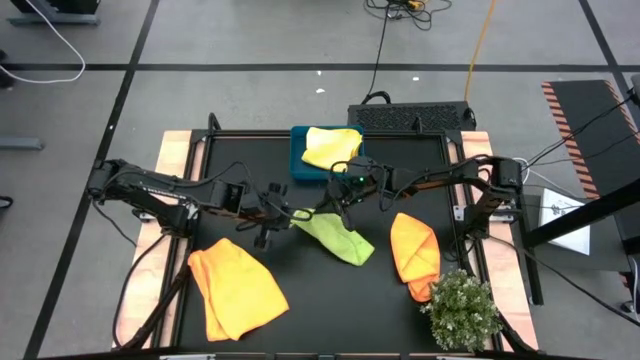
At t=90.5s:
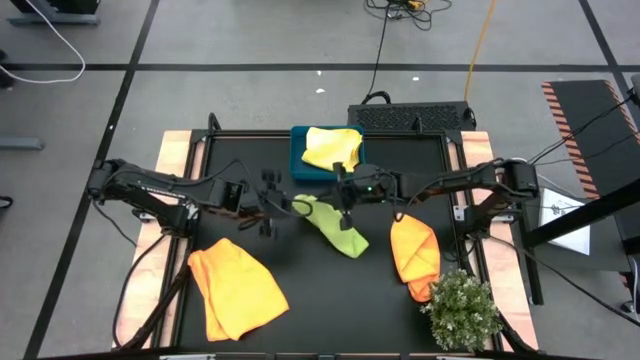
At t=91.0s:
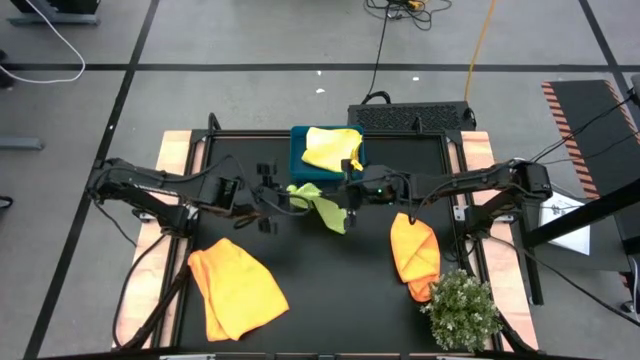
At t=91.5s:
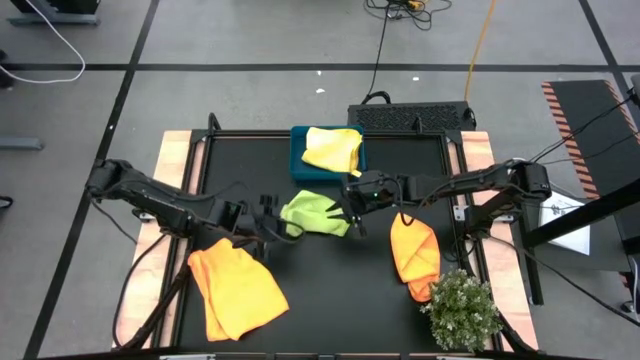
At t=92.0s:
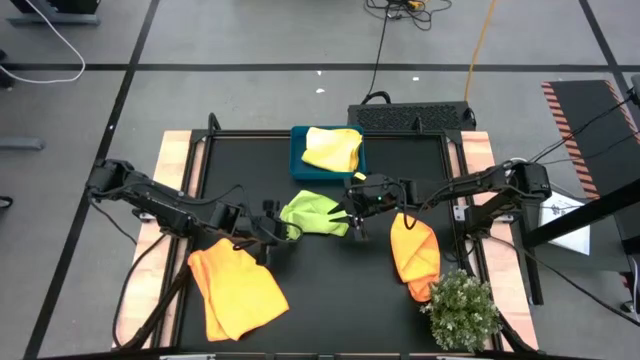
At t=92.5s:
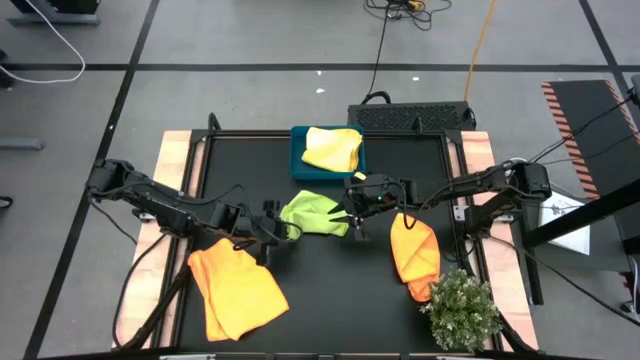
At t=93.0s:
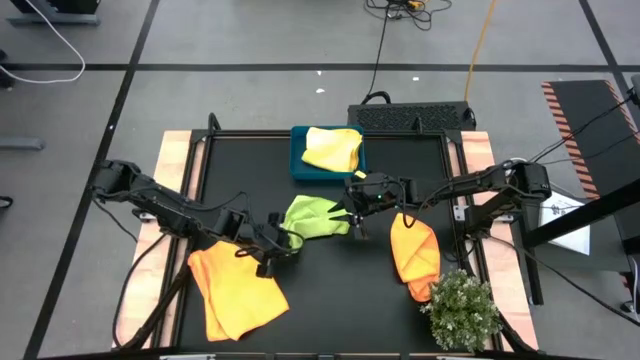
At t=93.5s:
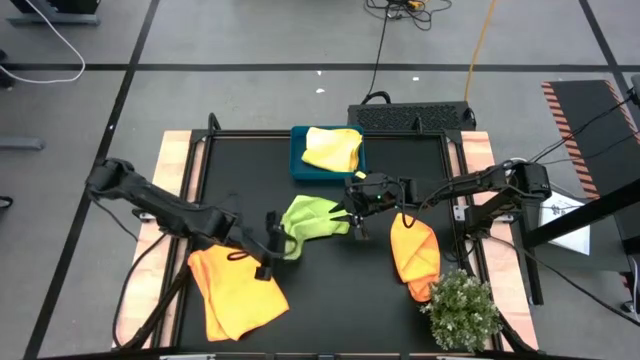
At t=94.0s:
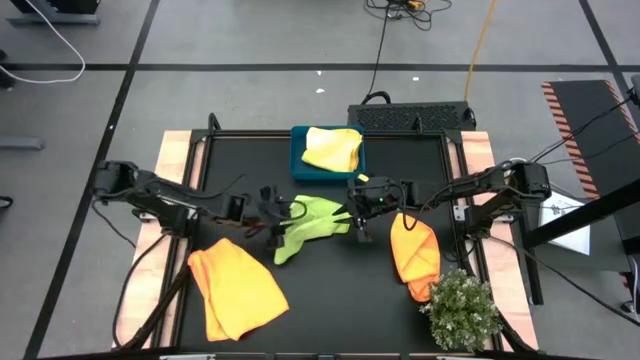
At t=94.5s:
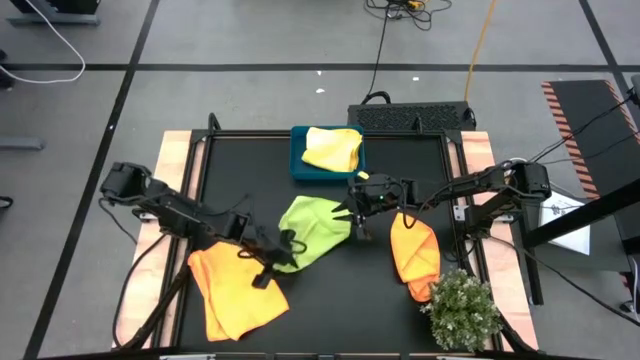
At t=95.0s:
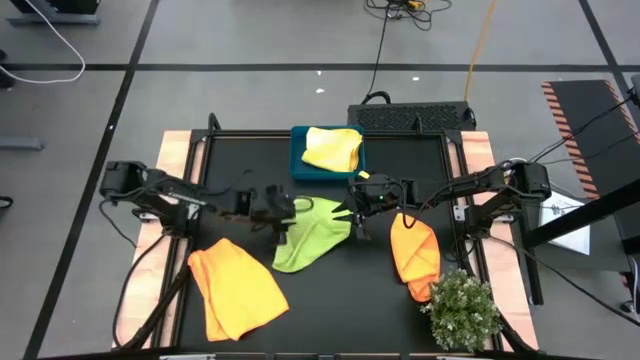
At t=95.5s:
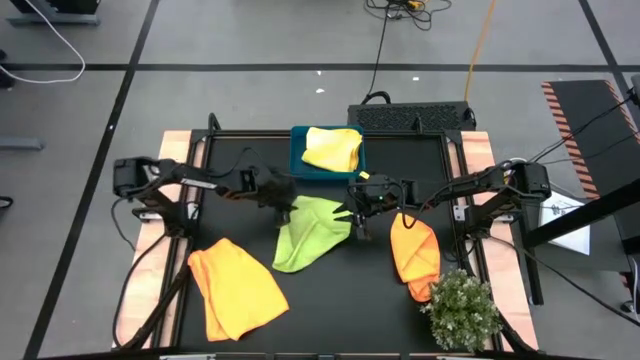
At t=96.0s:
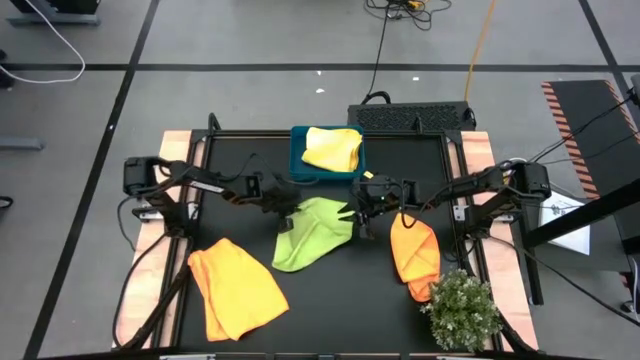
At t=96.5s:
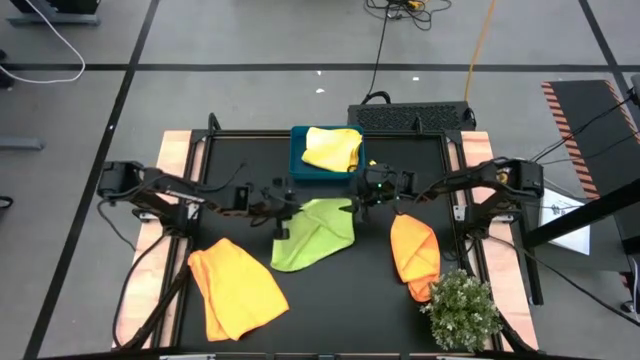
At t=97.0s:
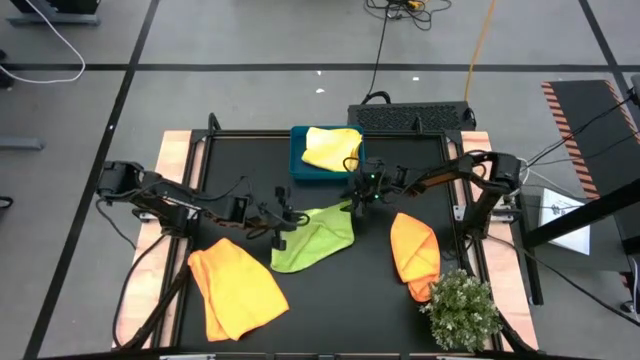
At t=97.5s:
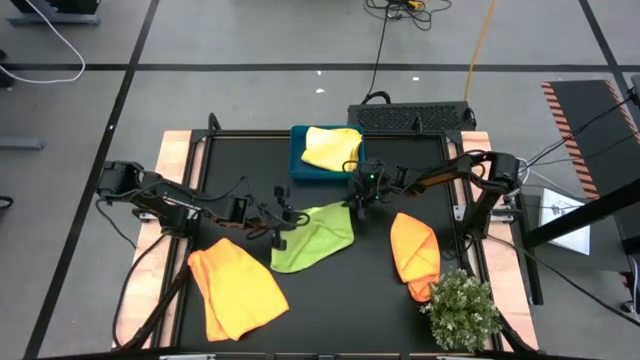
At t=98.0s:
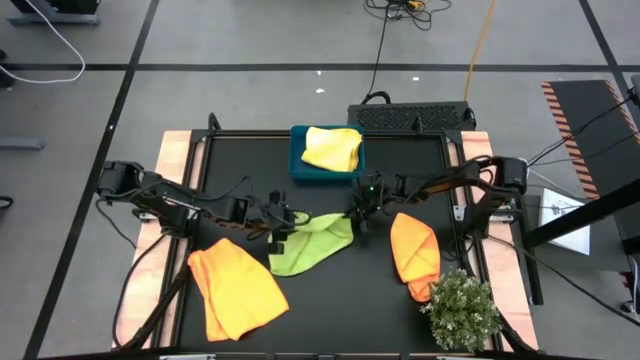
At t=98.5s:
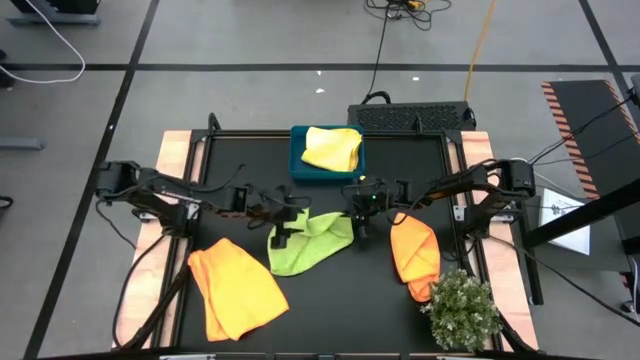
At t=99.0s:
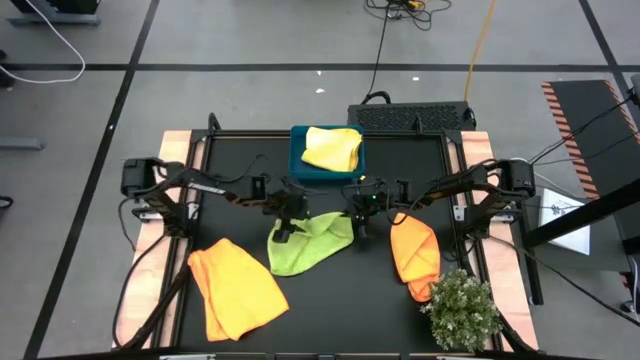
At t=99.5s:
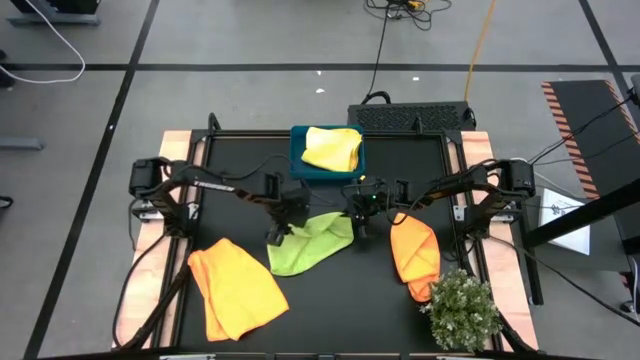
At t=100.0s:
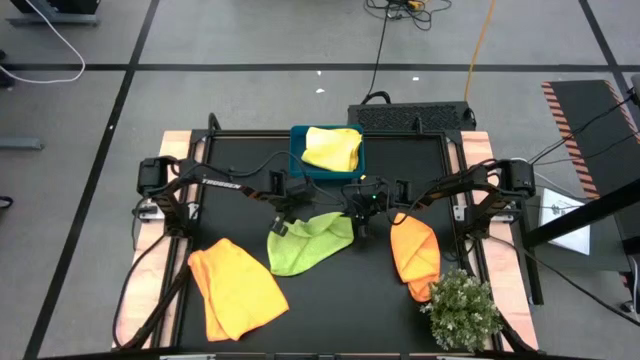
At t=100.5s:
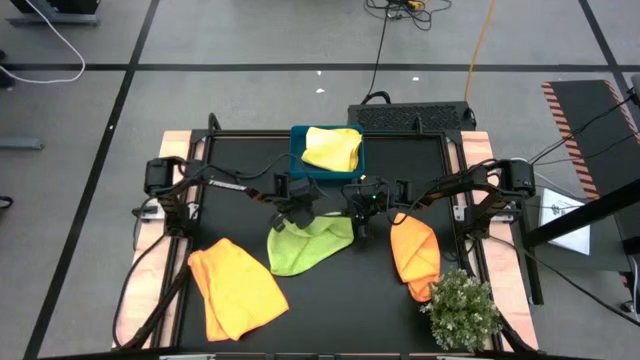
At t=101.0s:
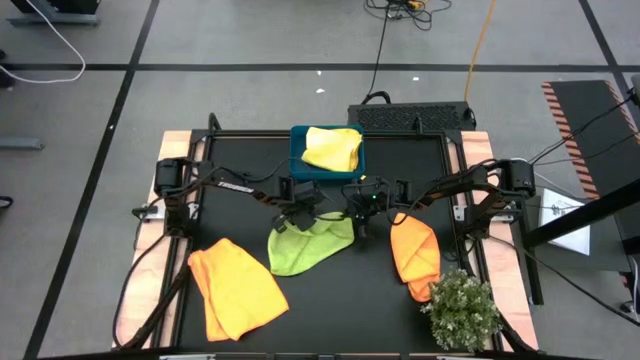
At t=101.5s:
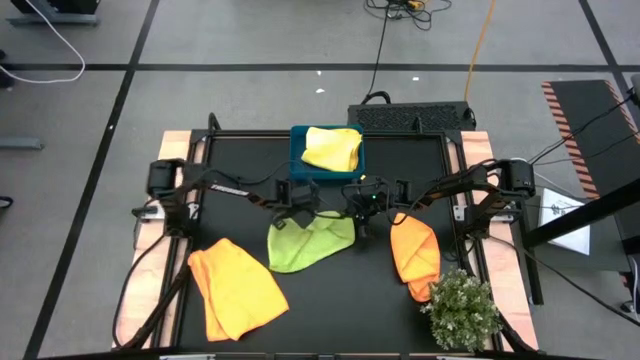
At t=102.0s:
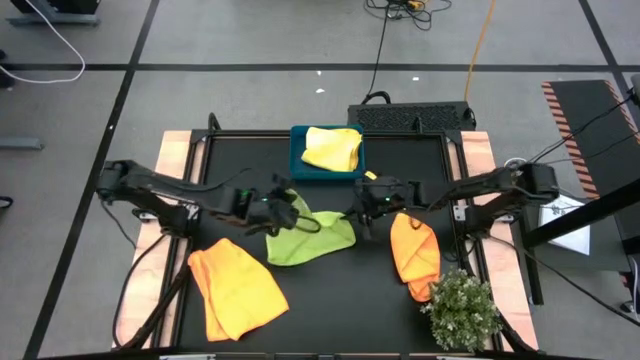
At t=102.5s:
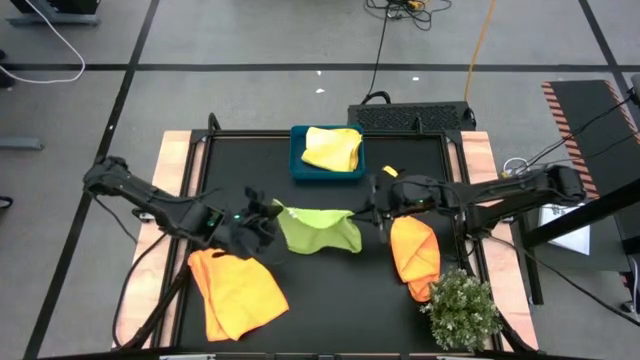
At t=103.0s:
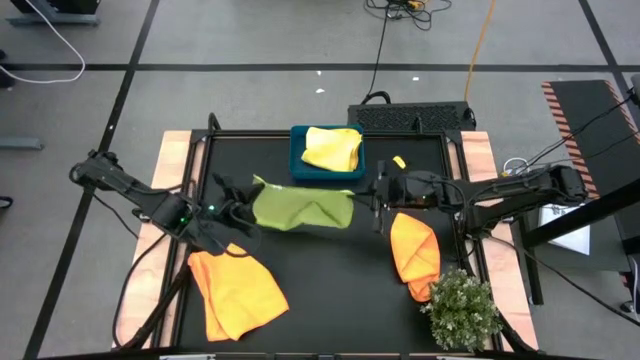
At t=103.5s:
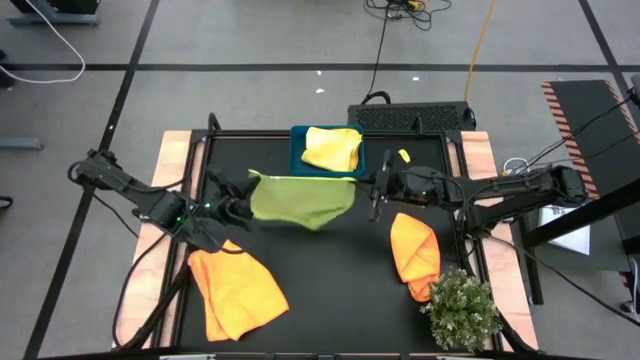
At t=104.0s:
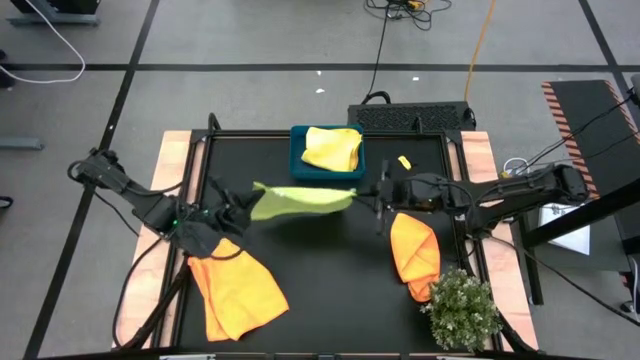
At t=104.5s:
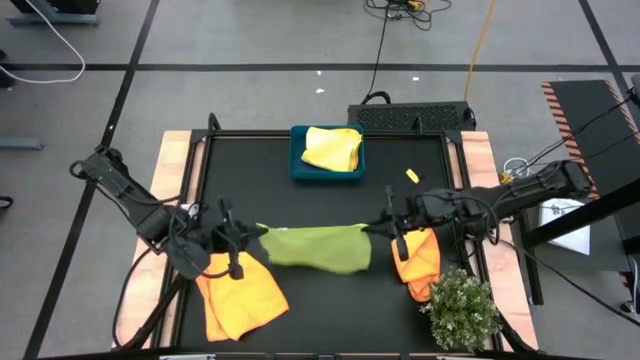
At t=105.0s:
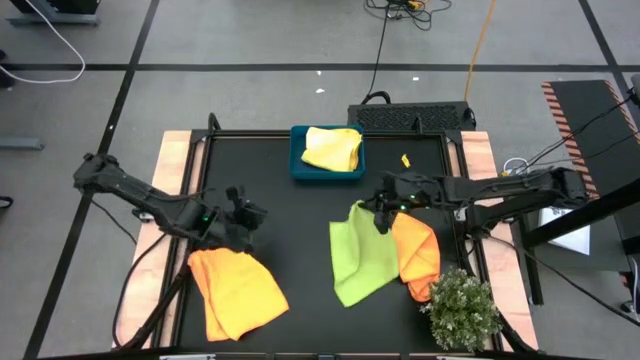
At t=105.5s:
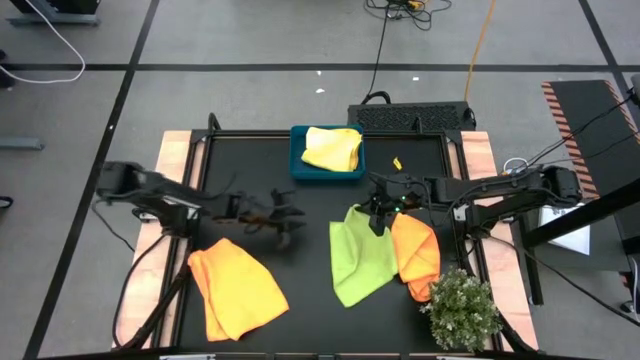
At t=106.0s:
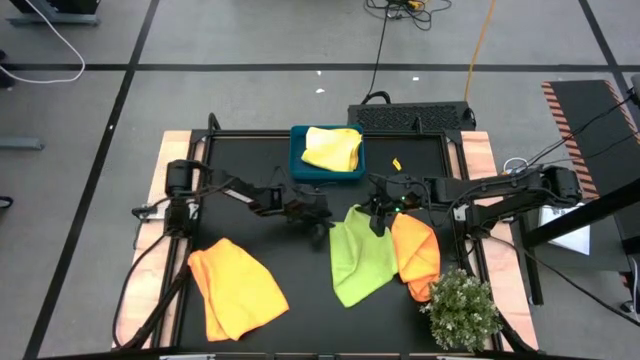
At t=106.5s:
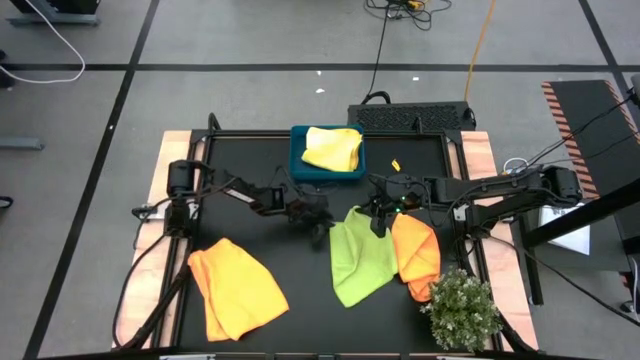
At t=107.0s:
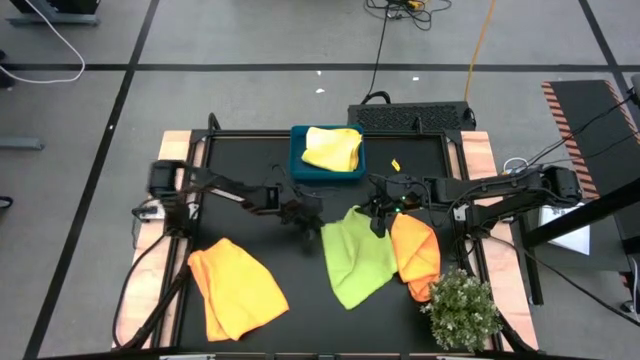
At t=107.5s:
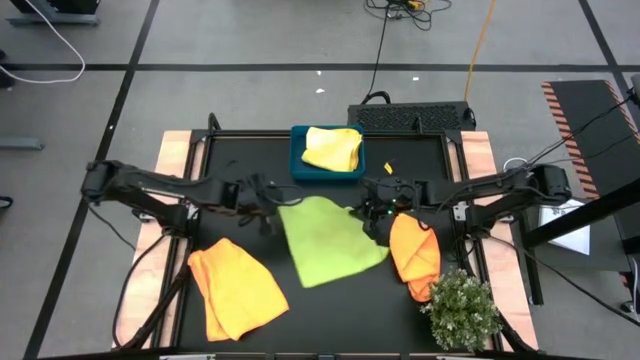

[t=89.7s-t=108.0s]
Task: Fold microfiber towels
Fold the green microfiber towel

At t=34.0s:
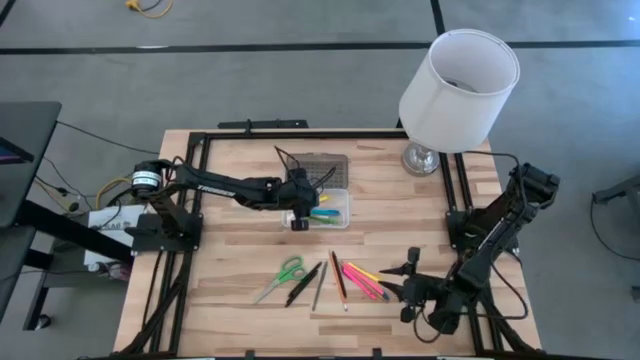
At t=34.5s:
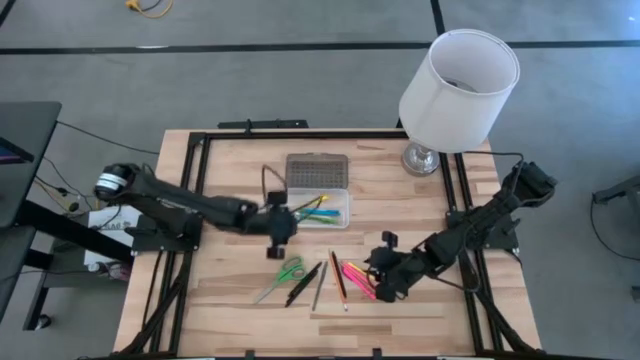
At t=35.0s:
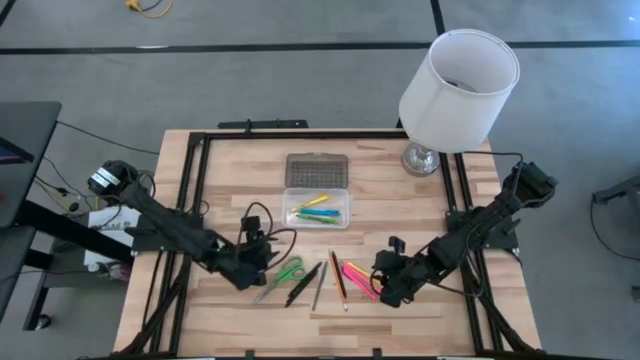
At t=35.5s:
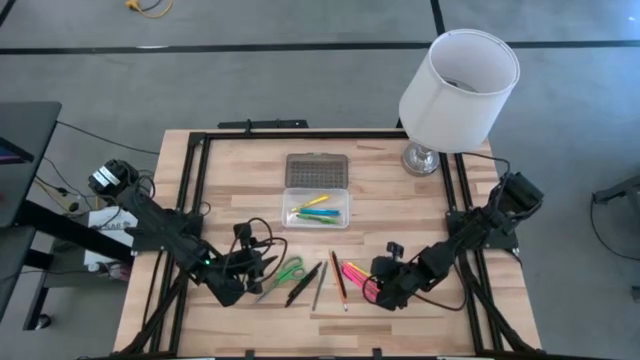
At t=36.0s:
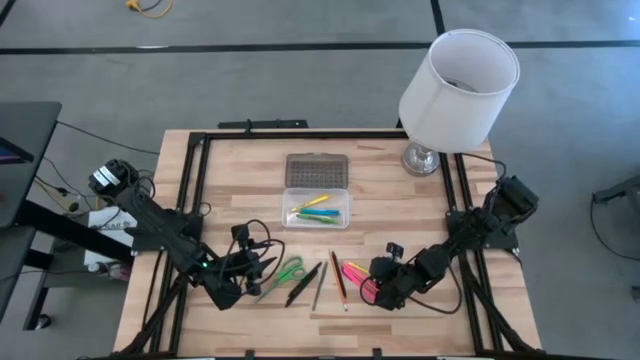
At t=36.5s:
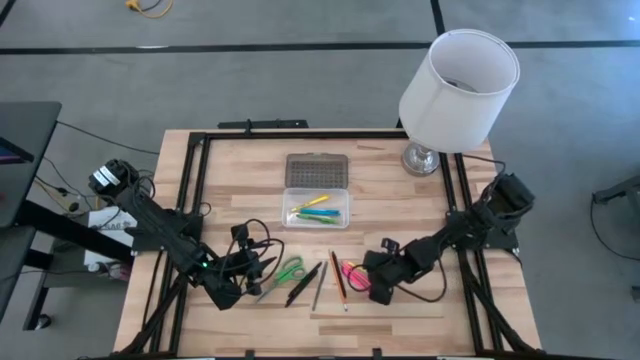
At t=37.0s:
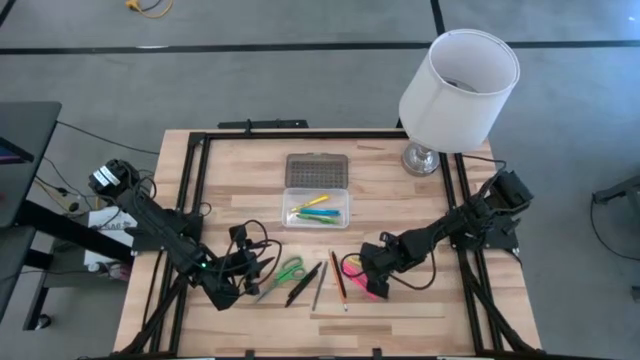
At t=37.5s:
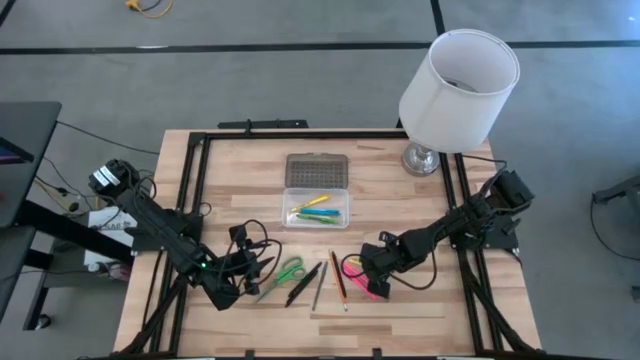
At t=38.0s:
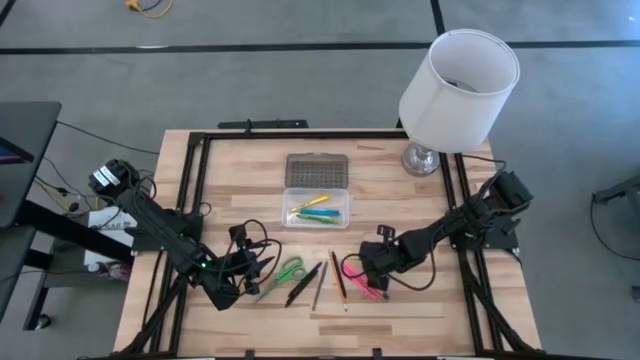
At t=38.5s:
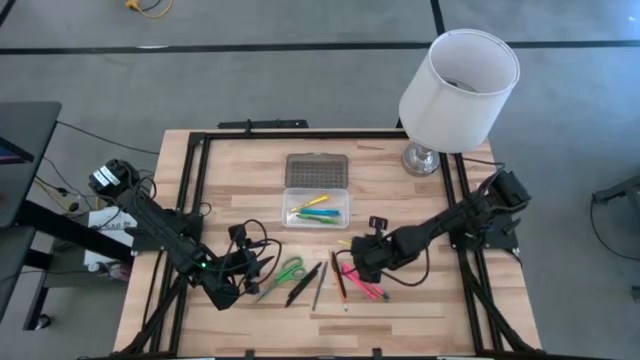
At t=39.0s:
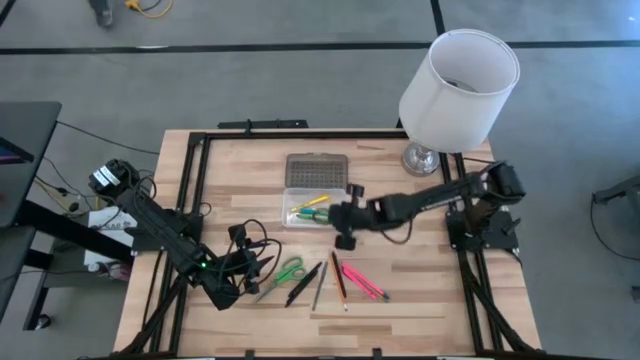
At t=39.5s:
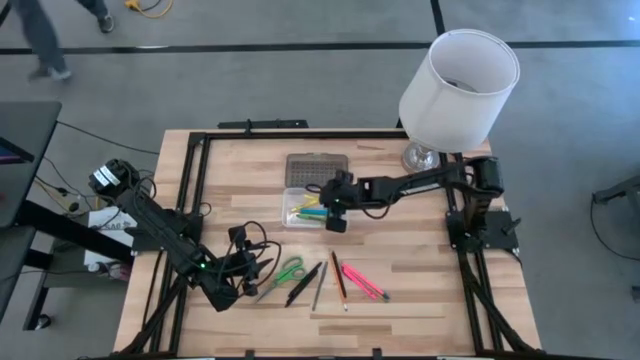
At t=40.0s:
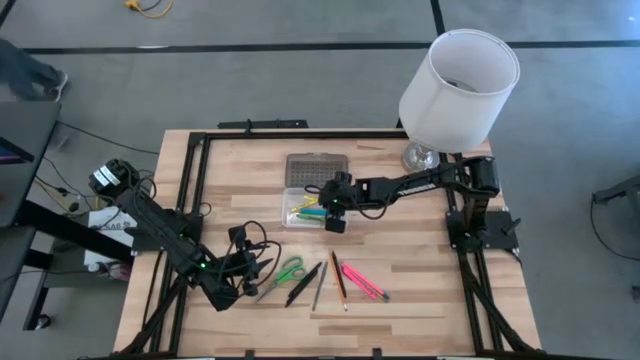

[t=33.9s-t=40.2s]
Task: Pick & place school supplies into a supply box
Put the yellow pen into the black supply box
